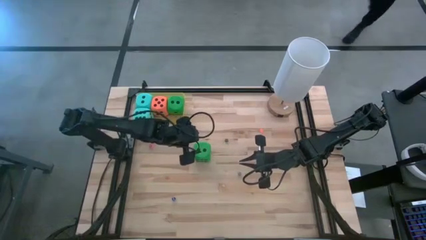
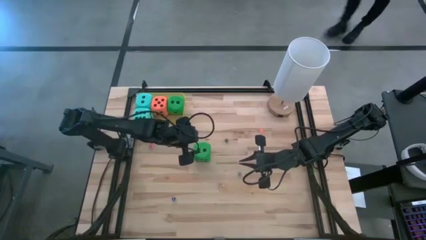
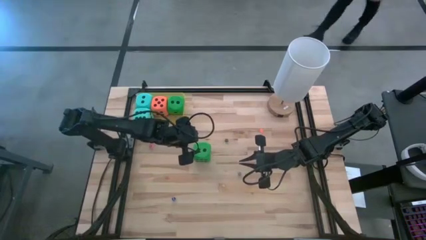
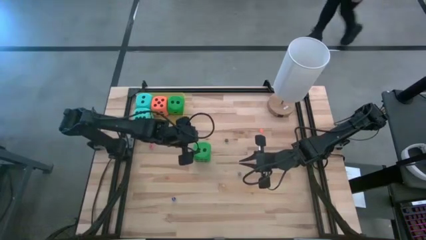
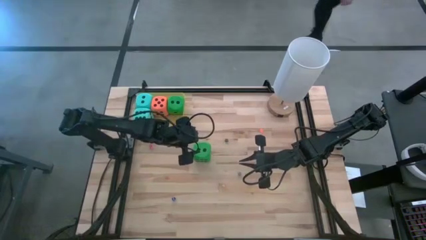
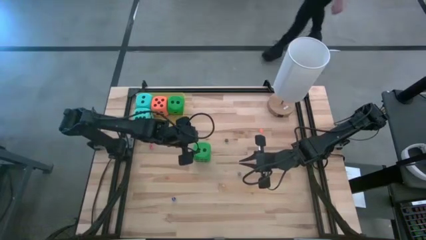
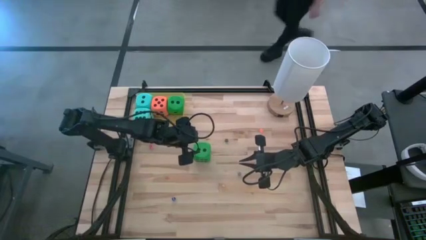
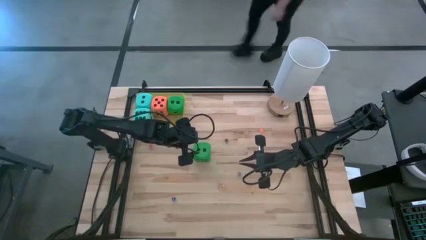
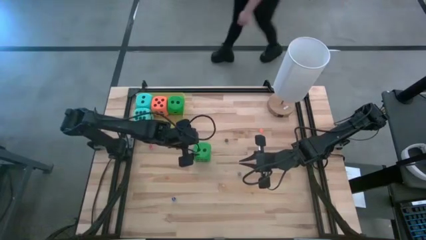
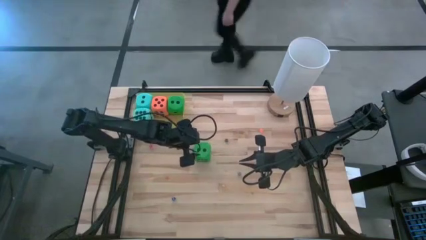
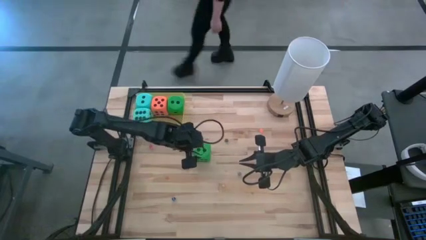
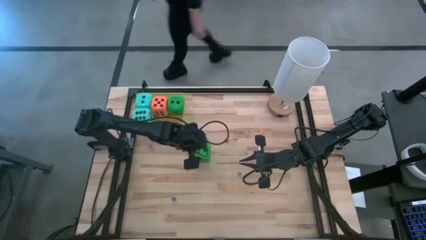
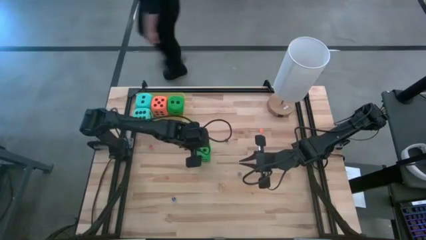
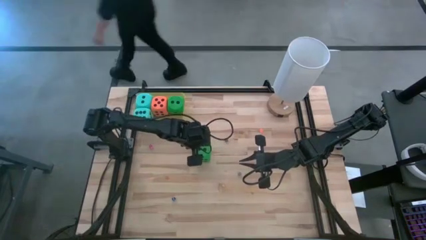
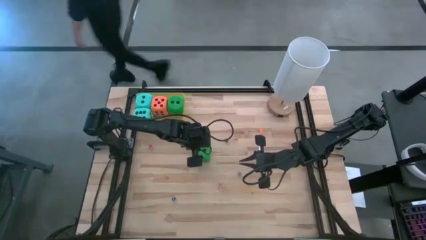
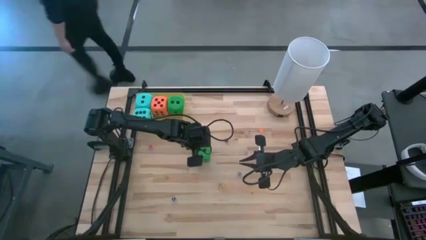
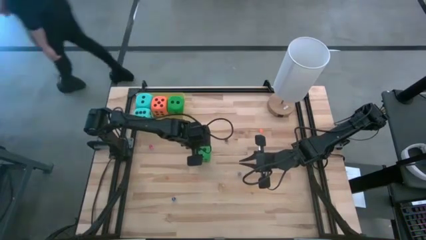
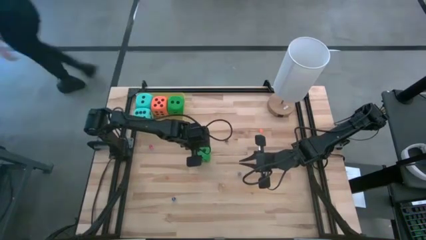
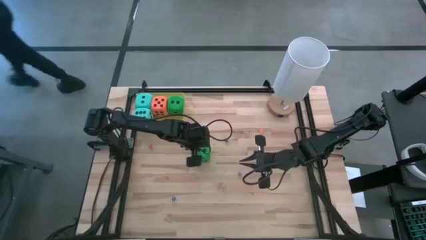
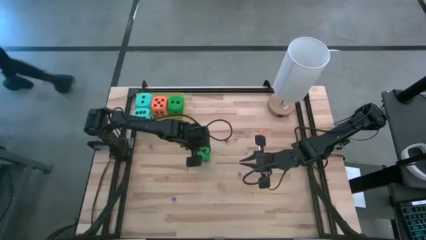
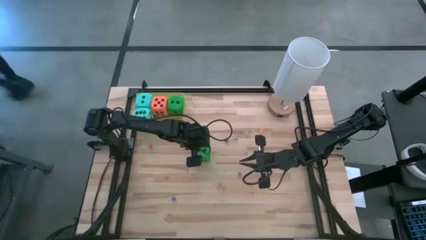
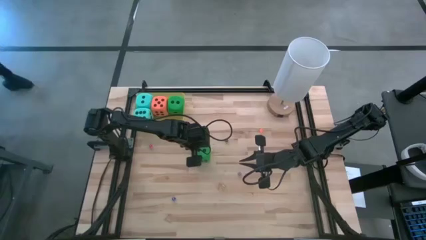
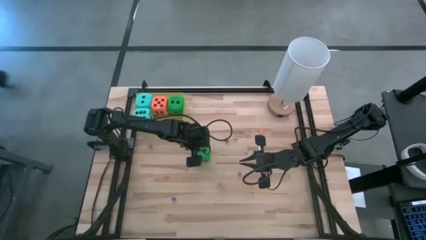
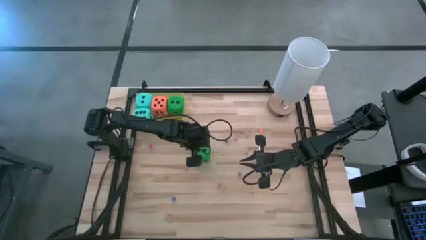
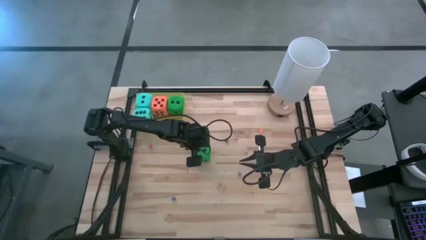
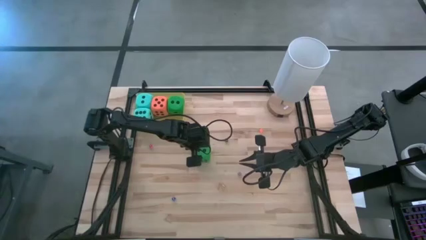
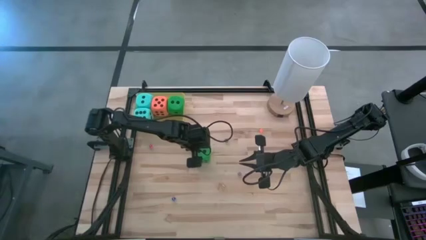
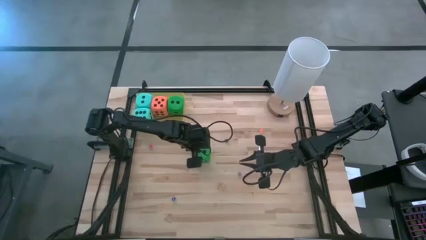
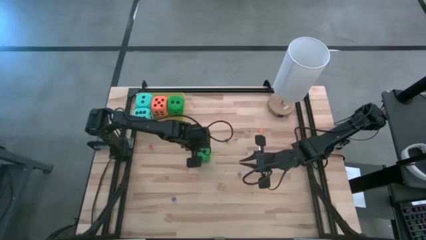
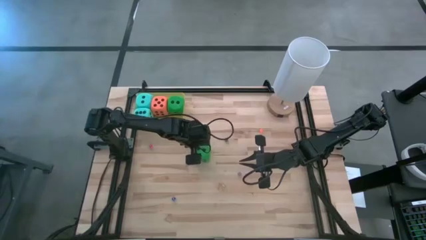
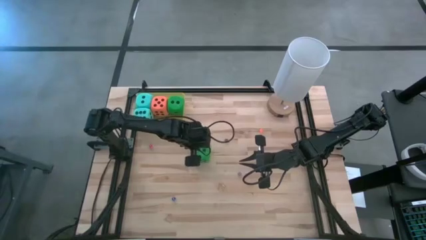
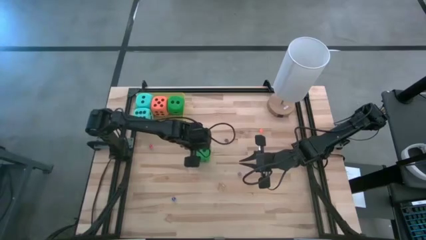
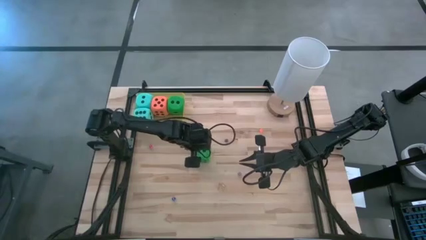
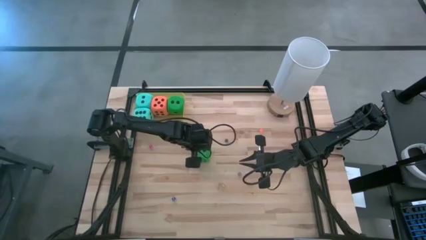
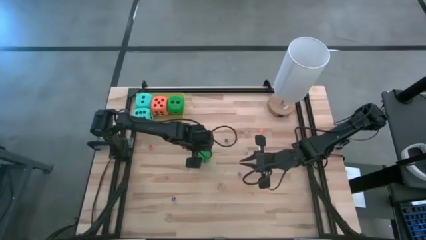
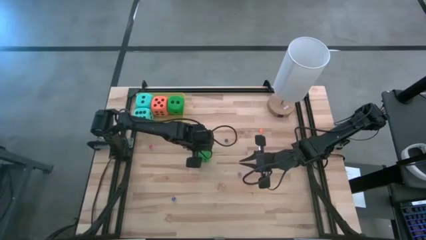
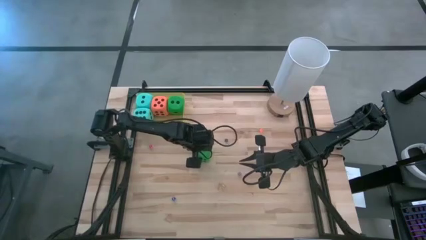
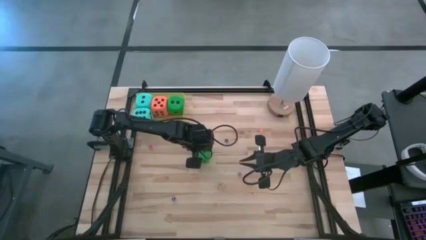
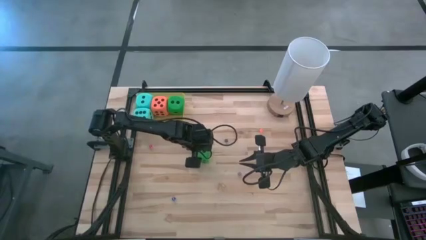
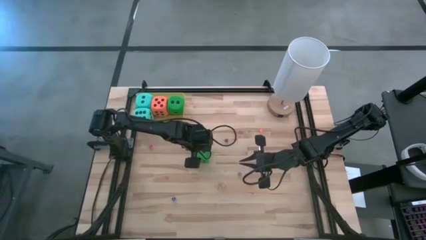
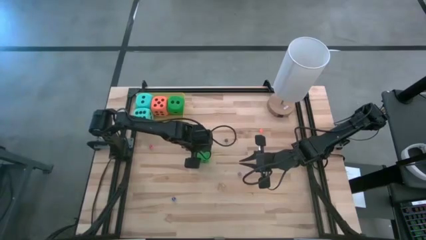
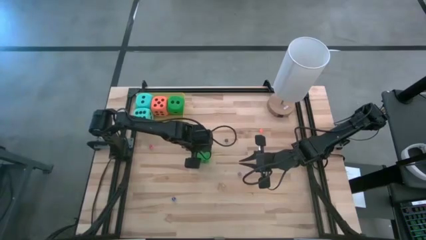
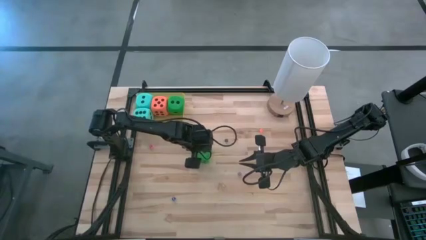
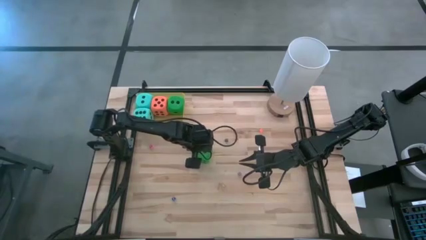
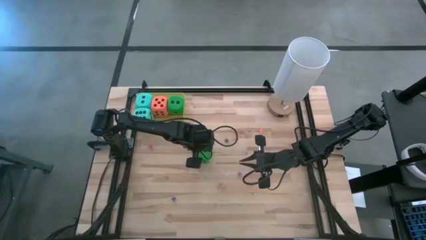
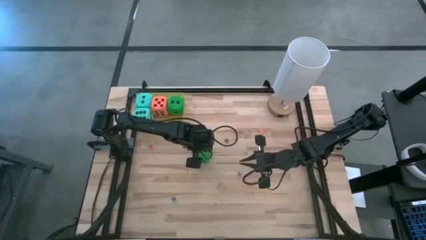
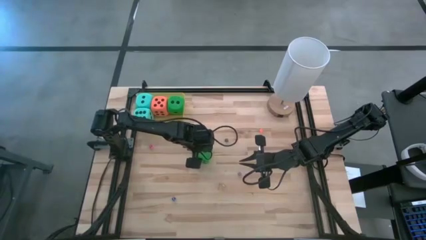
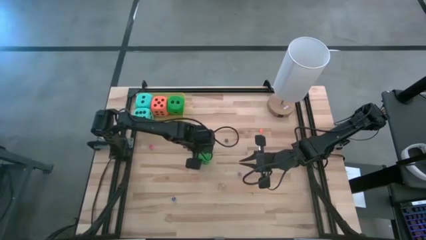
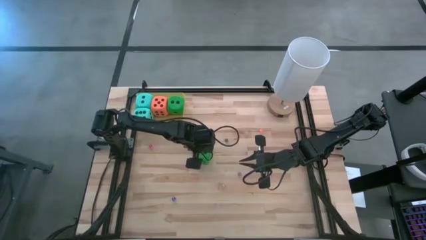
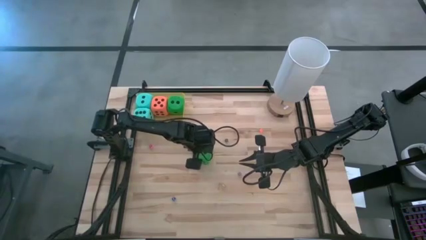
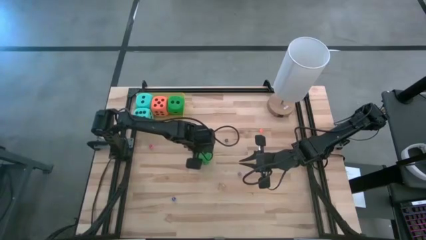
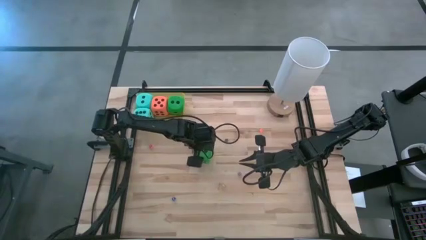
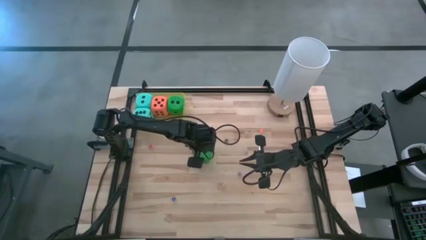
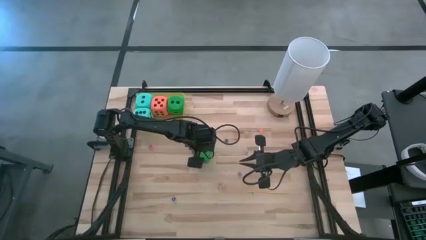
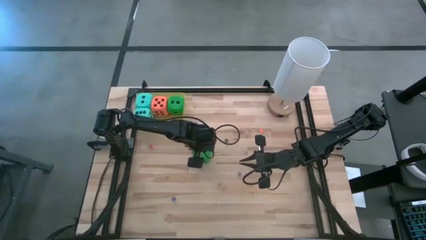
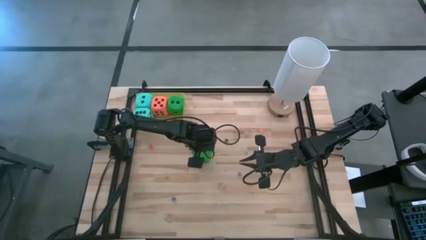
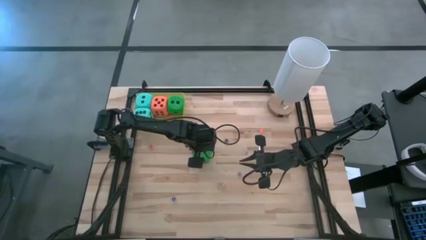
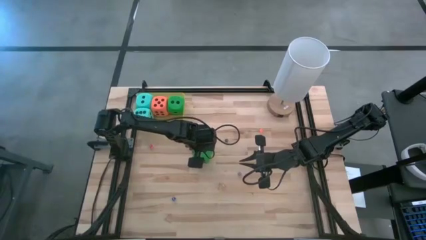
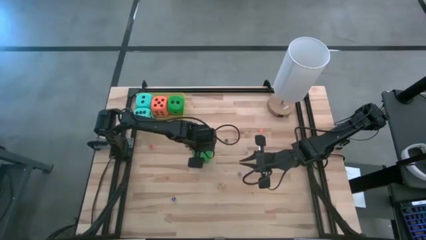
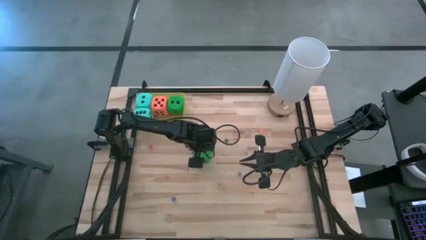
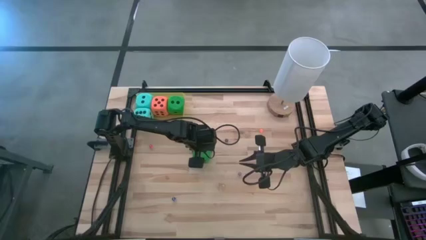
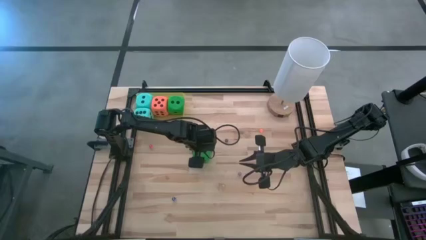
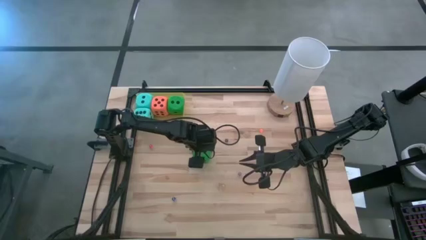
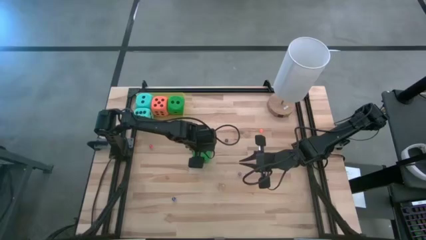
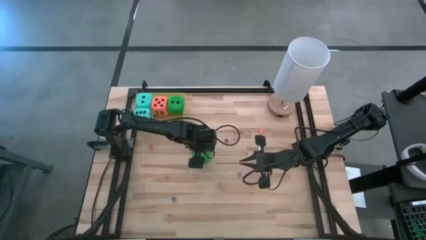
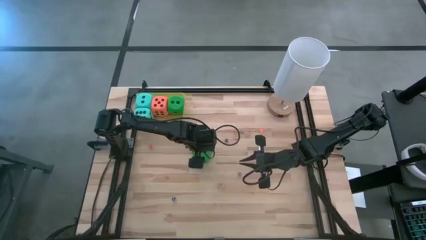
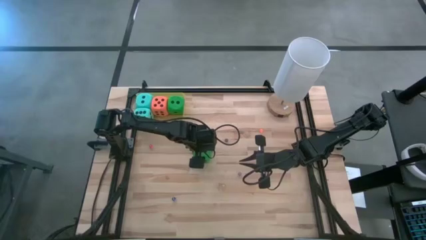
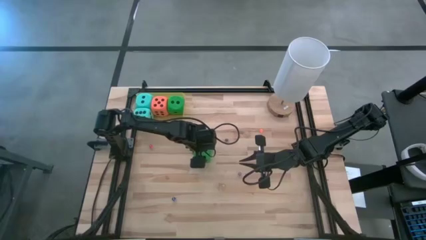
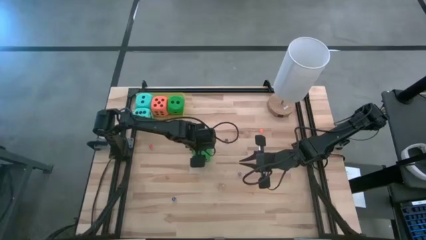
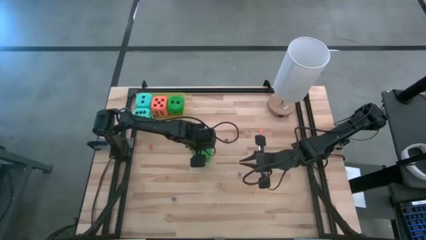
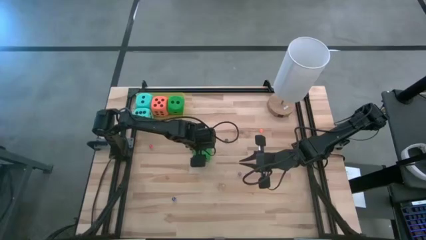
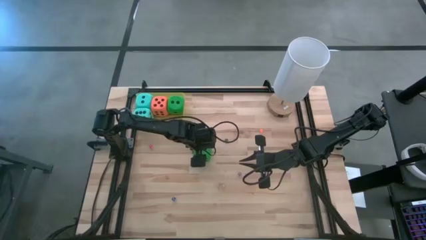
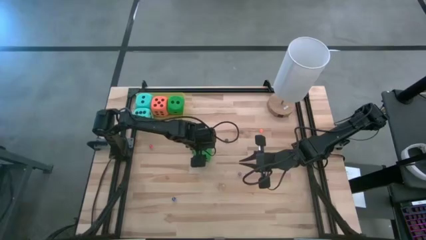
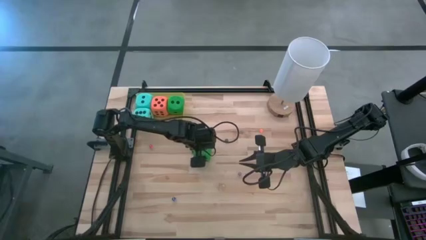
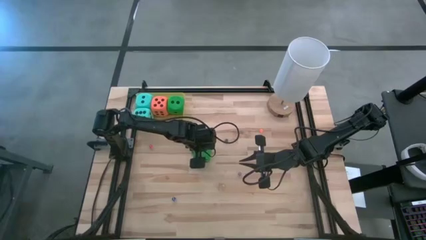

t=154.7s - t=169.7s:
Task: Pick & Place Dice
Put the green large die into the yellow container

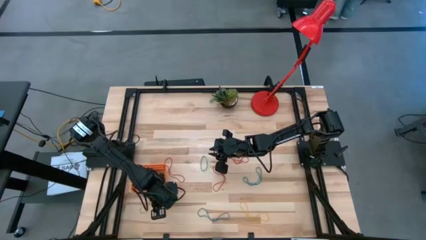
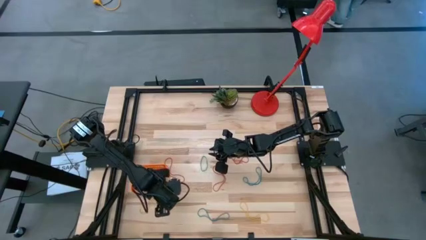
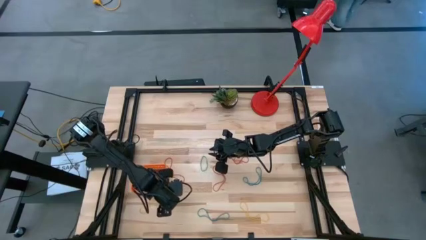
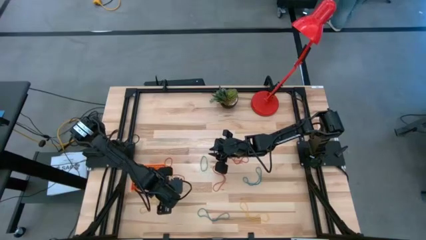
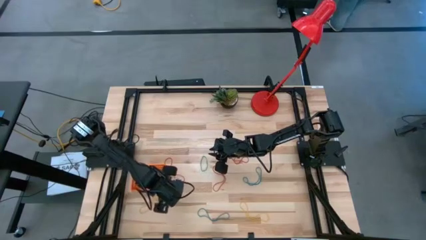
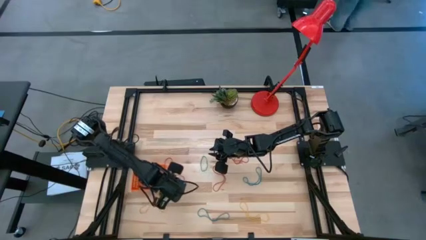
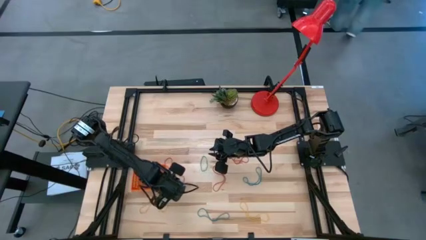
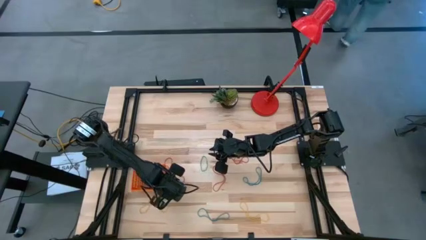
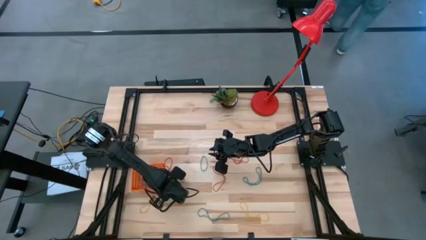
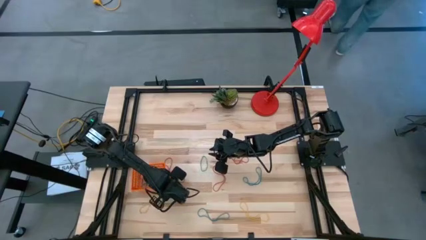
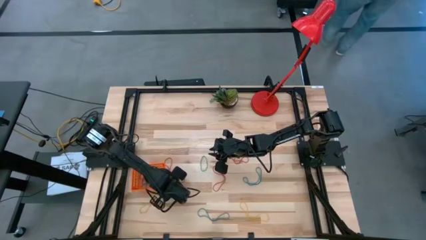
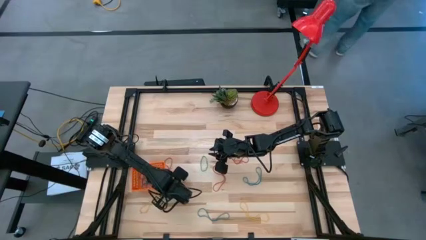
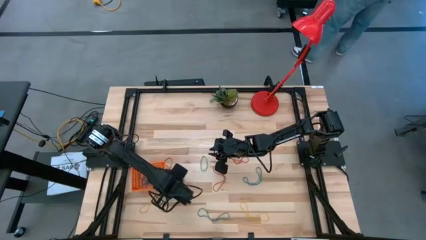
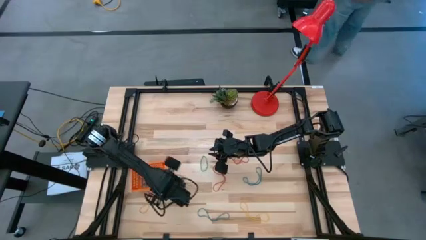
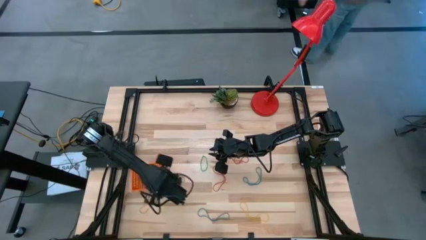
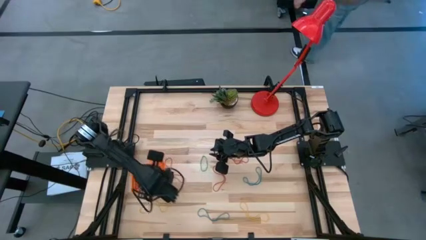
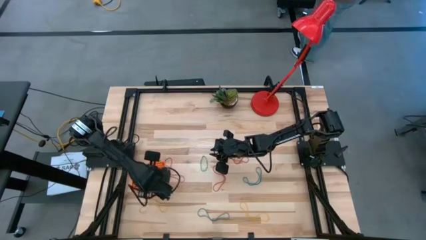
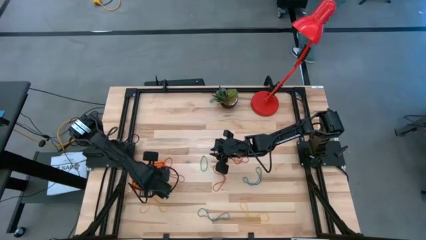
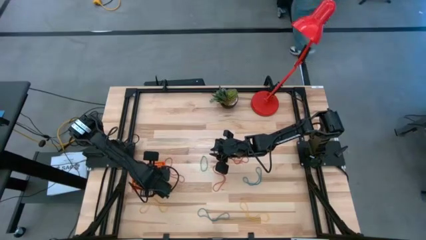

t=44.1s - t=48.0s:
Task: Pick and place rubber bands into bin
Put the green rubber band into the orange basket
